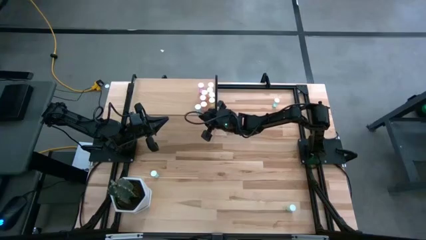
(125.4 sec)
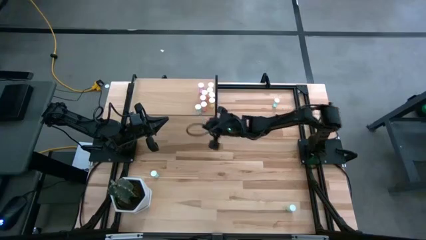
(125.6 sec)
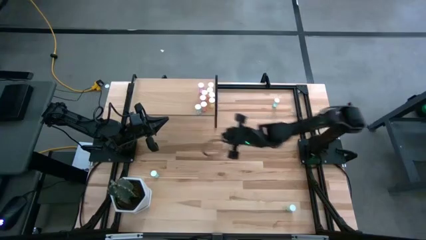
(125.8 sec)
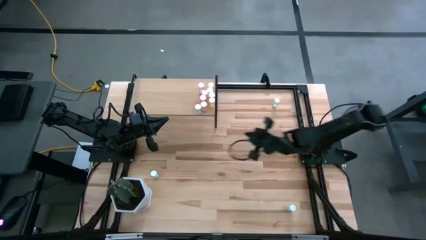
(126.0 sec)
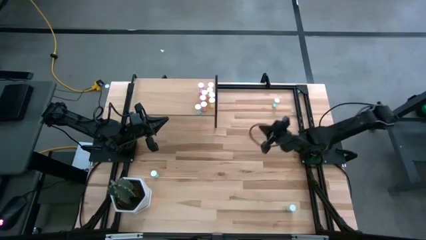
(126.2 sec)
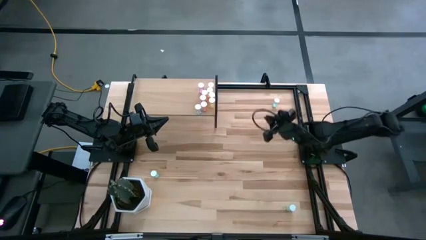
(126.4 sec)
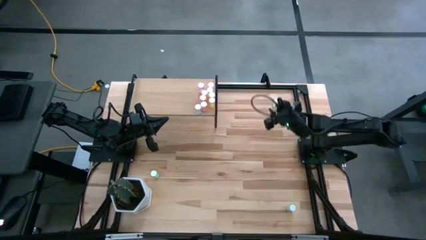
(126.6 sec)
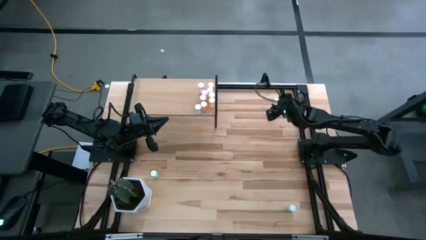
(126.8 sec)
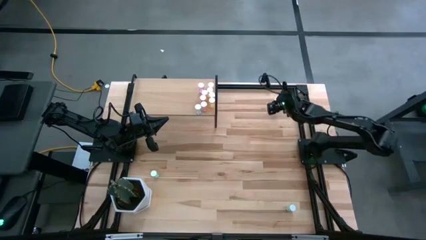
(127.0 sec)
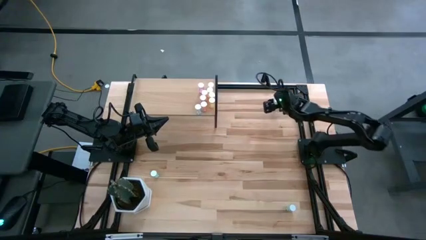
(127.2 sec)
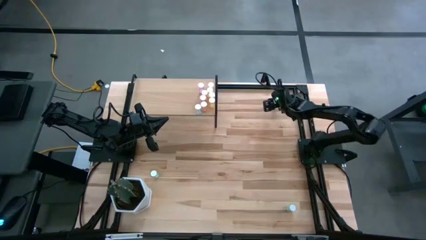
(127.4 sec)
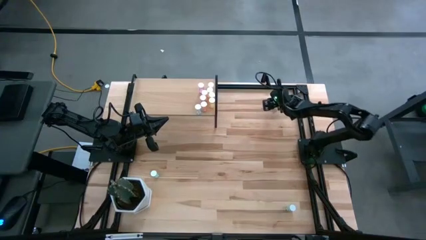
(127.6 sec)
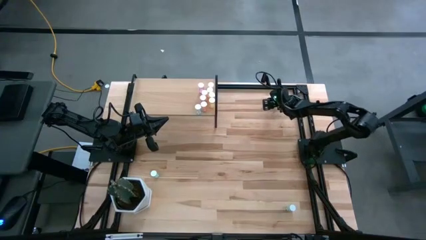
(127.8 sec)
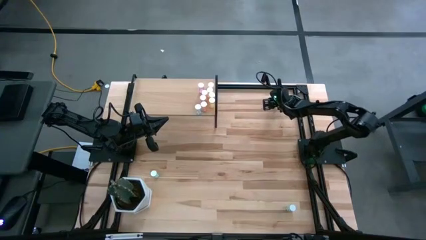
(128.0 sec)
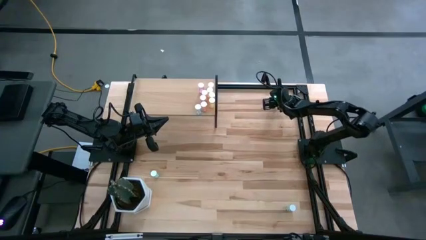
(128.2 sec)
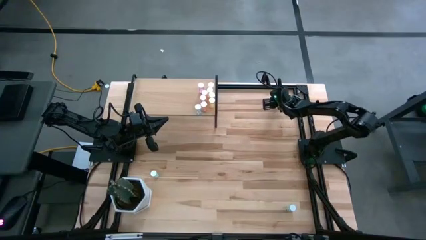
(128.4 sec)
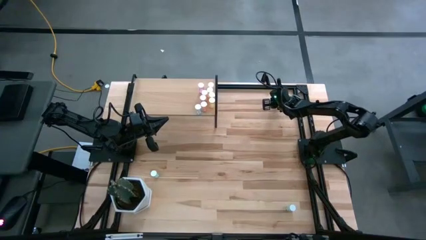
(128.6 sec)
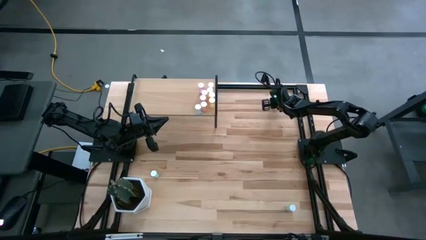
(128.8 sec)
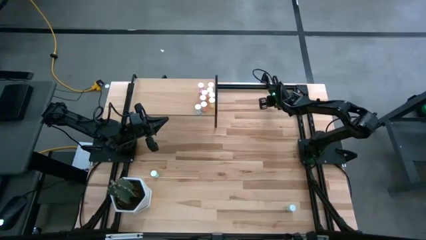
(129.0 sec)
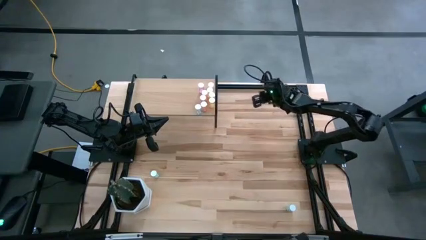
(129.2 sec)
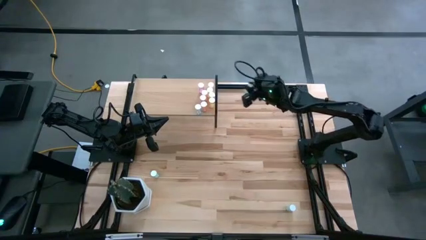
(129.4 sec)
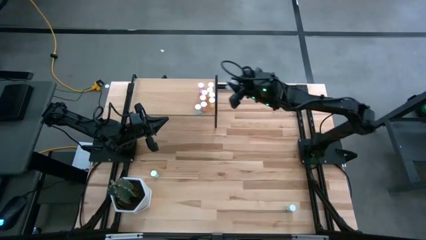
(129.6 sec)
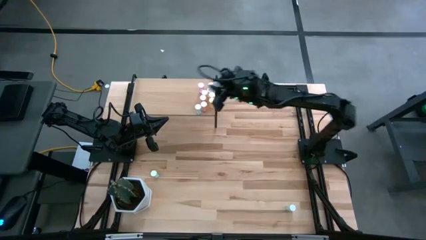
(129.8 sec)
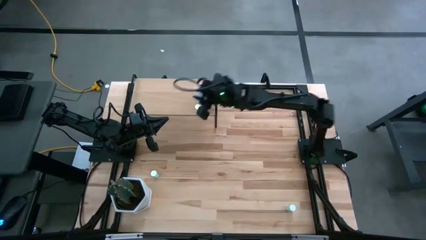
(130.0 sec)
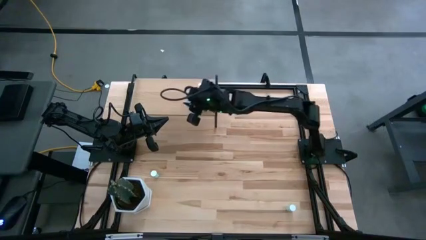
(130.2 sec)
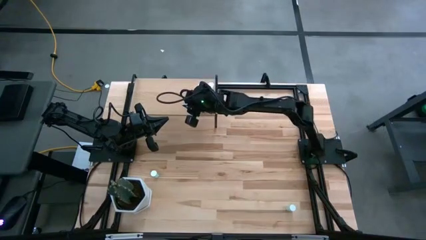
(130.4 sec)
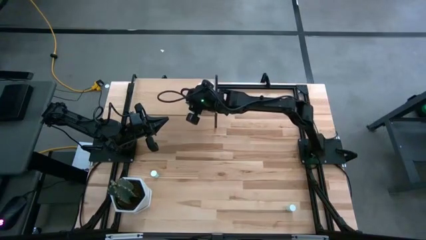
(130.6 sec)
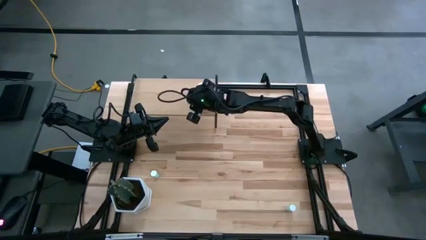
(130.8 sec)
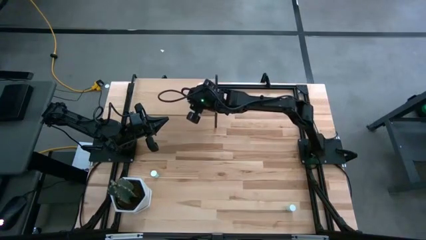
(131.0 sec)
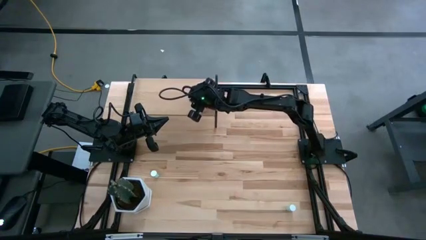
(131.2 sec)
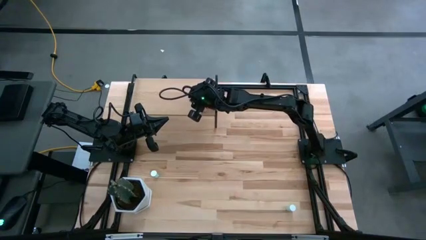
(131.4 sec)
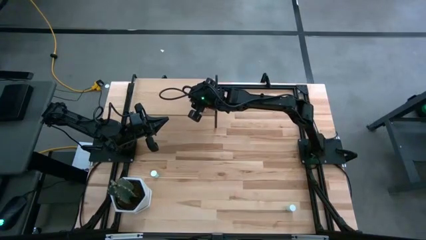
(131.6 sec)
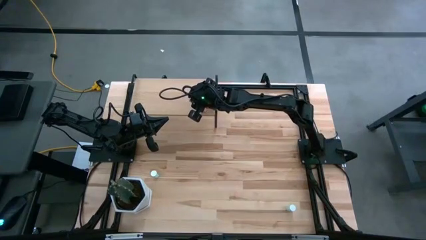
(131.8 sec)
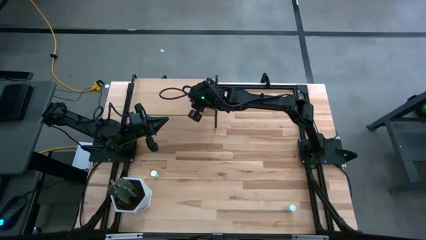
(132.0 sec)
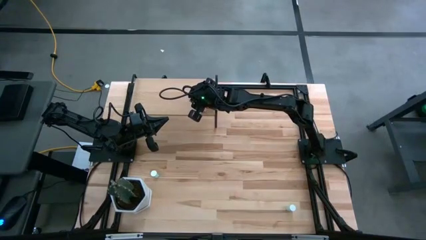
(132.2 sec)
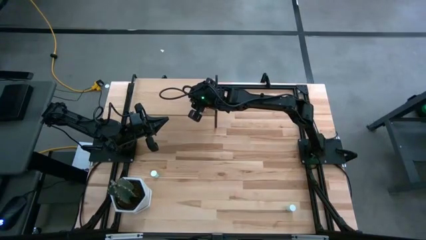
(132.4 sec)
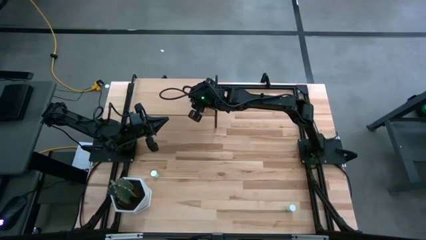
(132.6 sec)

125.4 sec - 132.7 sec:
Task: Pick and place medicine bottles onto shelf by color
Put the top green pill bottle on the shelf

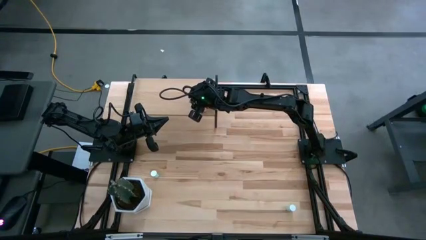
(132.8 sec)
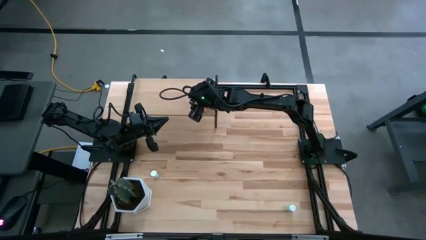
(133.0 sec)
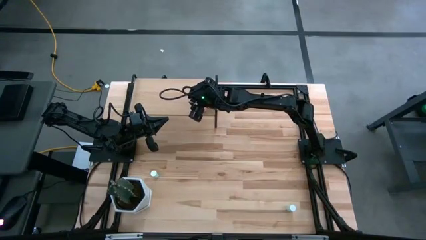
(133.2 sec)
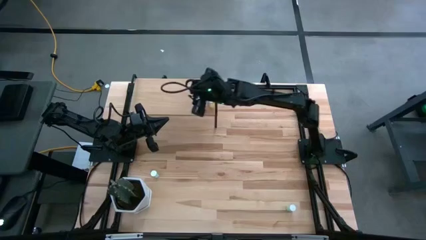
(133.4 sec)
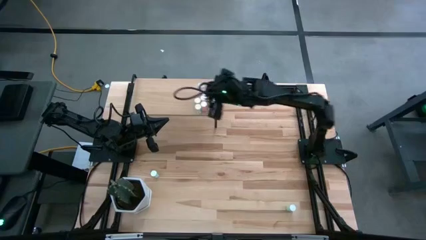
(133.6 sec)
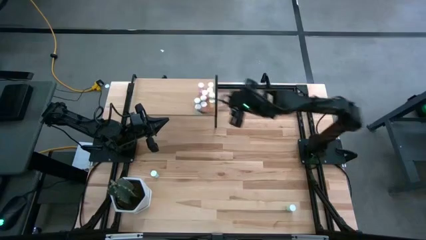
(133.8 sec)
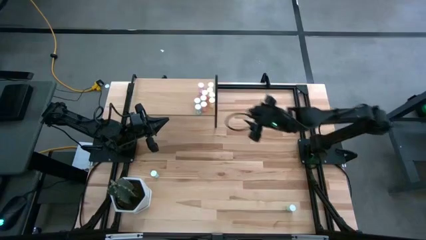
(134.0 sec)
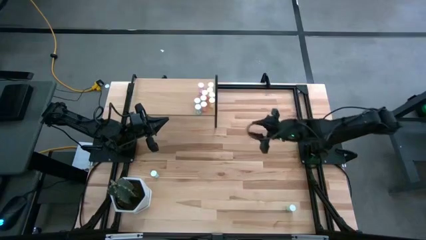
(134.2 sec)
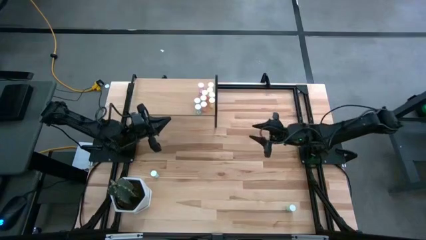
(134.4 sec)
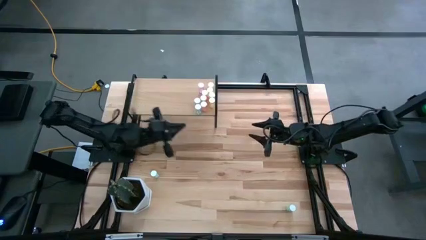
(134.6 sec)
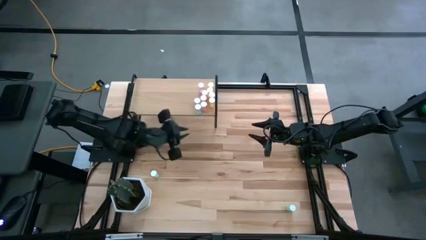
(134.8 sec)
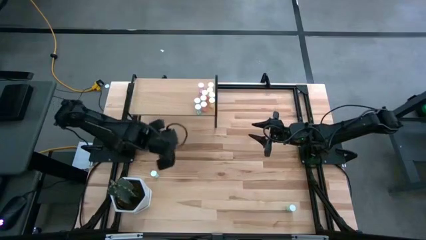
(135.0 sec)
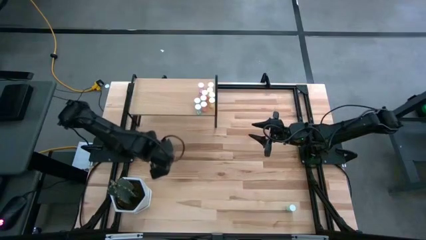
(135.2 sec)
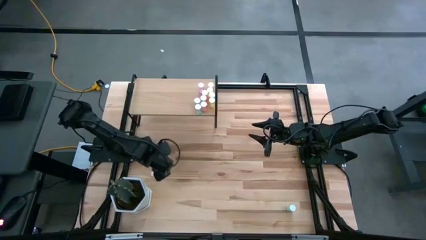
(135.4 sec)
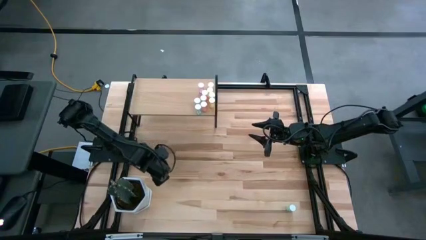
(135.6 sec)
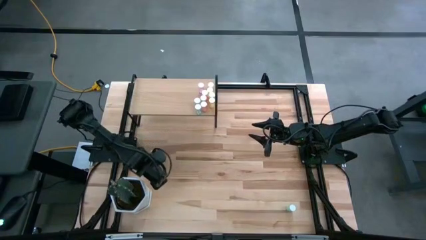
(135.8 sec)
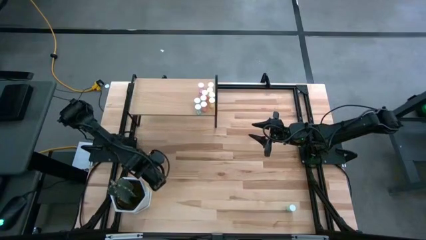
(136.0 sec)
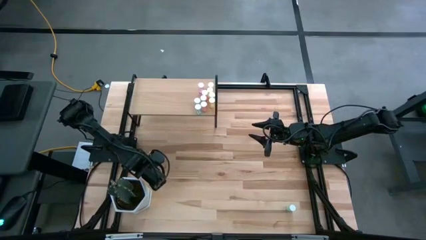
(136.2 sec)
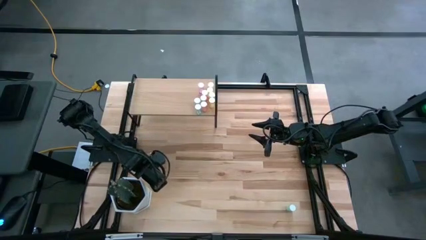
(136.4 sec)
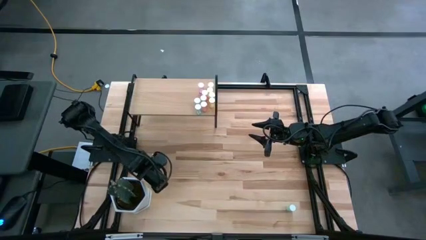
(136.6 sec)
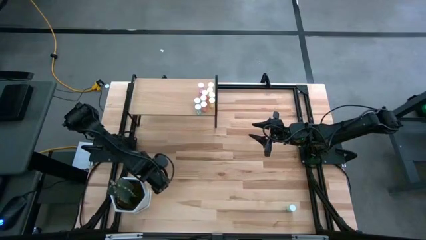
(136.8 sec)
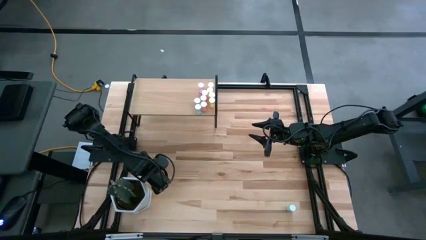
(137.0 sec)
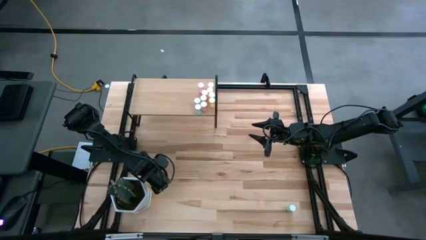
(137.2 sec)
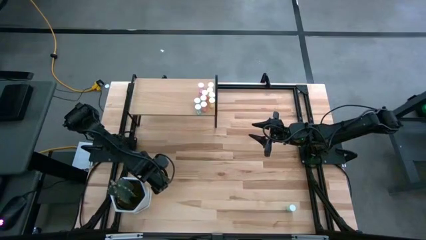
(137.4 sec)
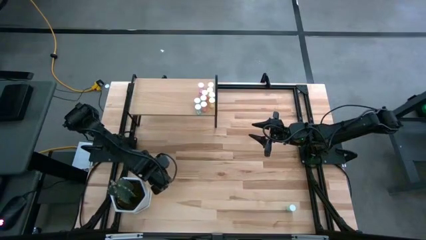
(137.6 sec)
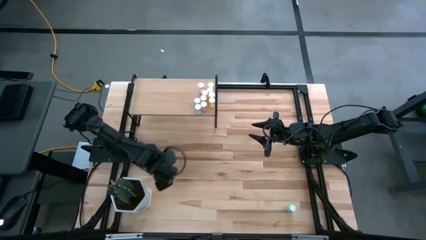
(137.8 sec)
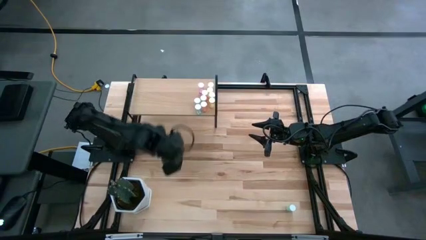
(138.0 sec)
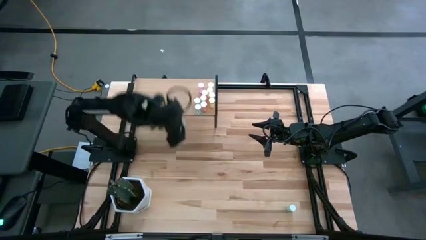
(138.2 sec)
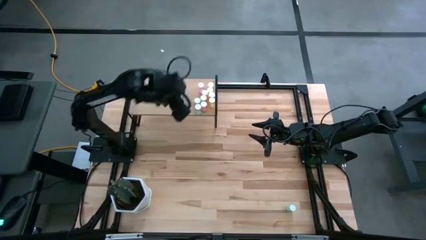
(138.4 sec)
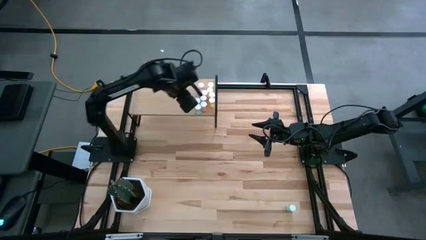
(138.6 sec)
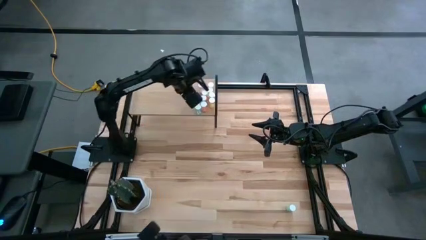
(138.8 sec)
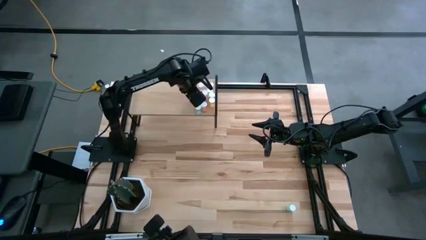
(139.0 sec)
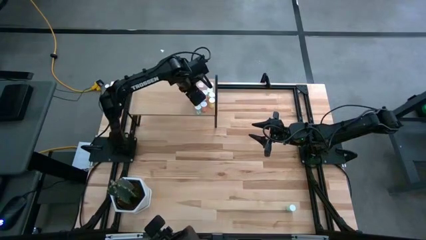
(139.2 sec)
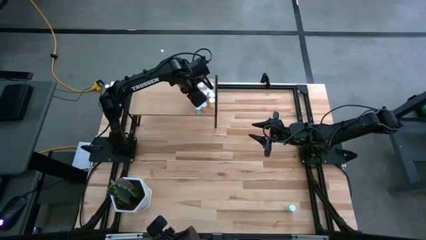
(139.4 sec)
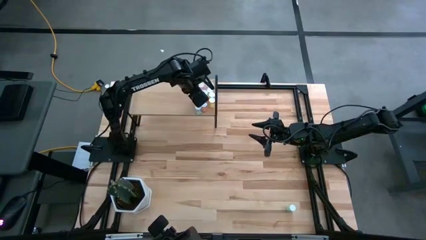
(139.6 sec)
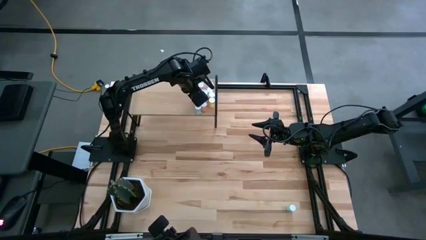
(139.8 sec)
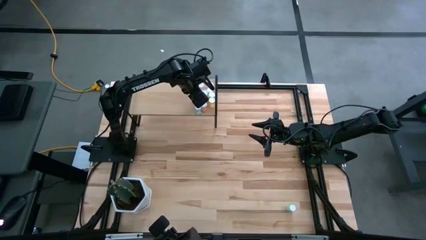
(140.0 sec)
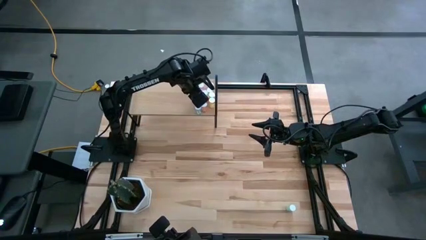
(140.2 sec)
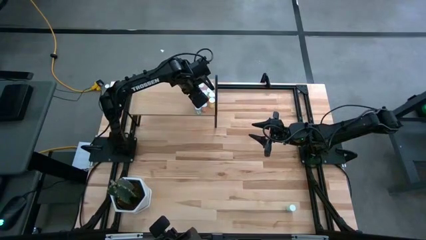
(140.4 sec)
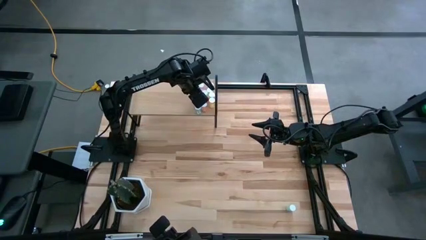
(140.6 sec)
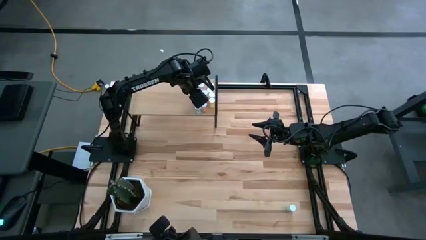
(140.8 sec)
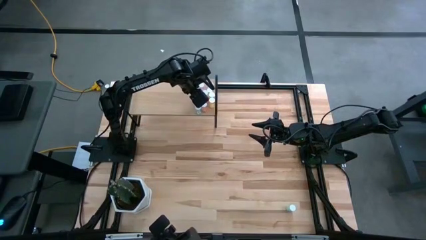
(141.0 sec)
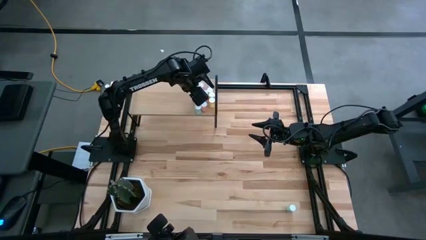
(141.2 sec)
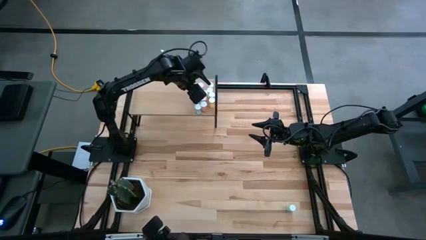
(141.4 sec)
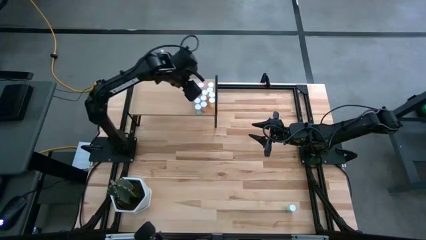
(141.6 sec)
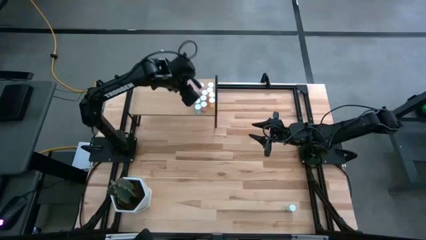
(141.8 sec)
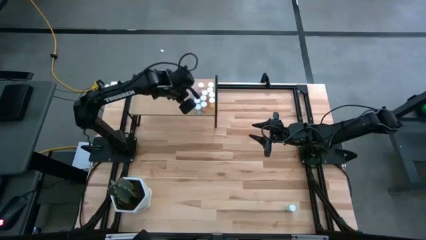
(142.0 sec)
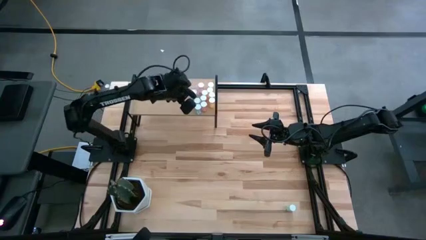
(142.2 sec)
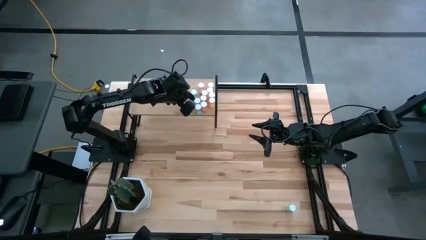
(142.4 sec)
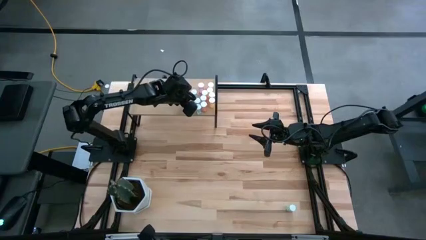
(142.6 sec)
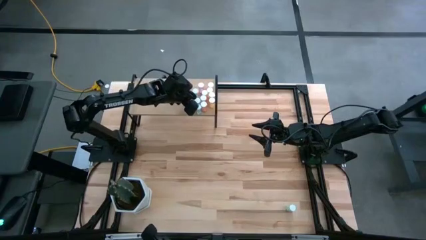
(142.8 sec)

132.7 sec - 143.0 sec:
Put the left green pill bottle on the shelf
